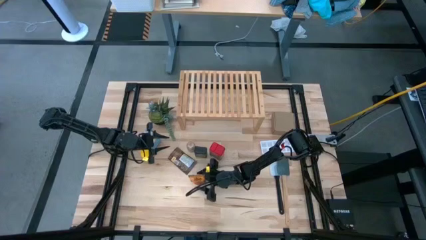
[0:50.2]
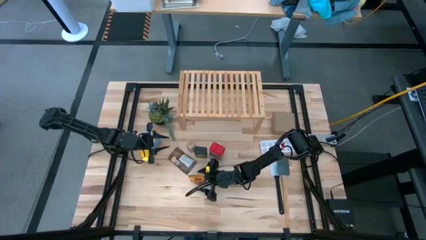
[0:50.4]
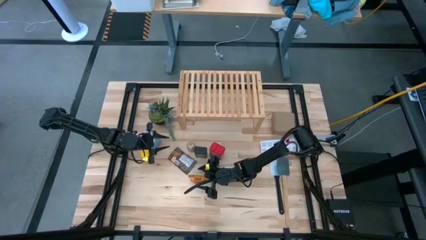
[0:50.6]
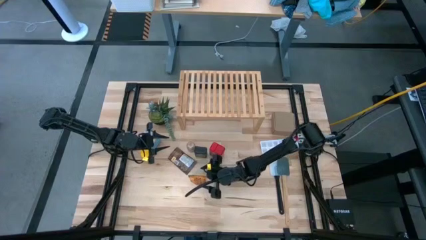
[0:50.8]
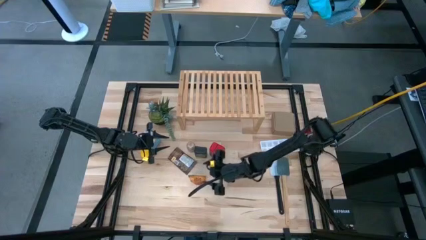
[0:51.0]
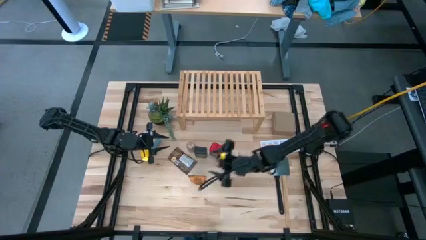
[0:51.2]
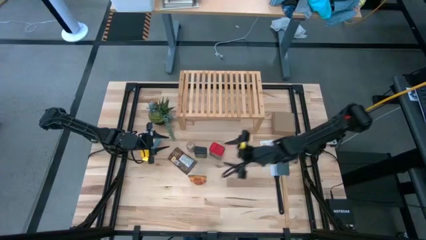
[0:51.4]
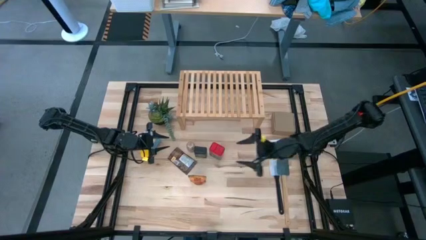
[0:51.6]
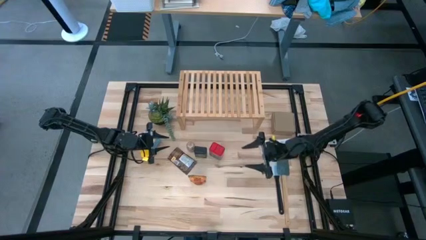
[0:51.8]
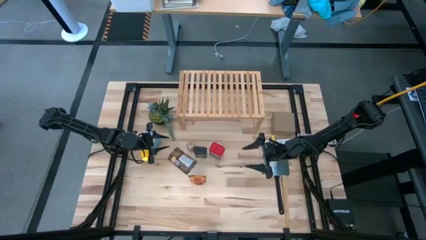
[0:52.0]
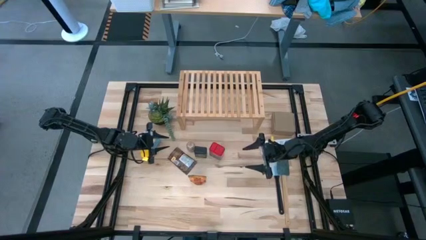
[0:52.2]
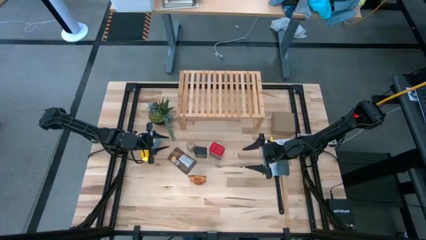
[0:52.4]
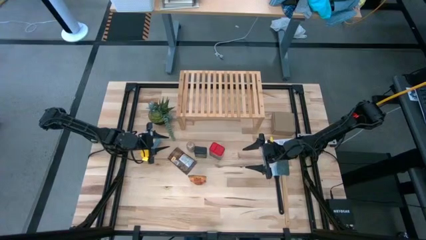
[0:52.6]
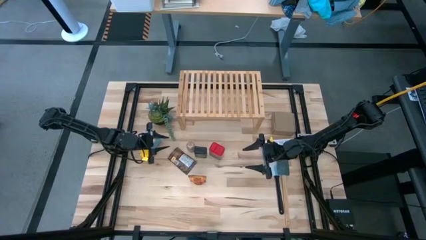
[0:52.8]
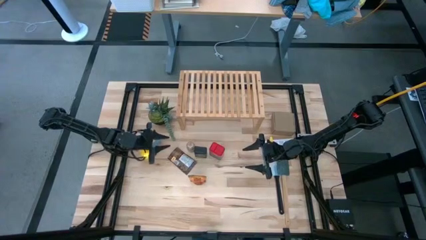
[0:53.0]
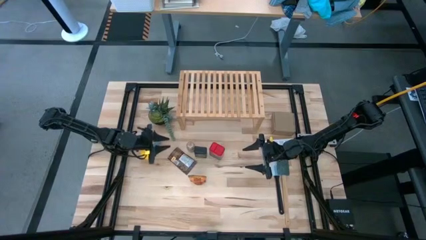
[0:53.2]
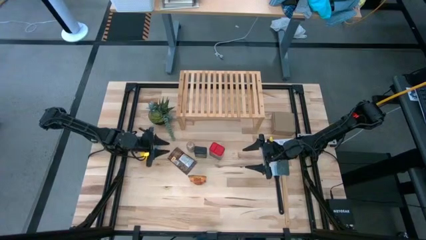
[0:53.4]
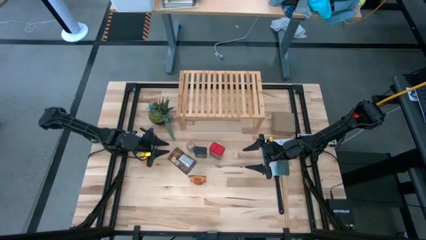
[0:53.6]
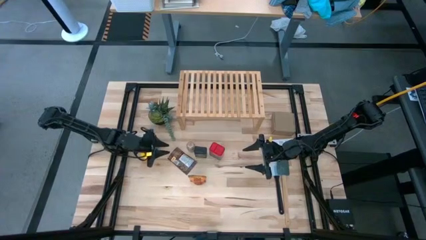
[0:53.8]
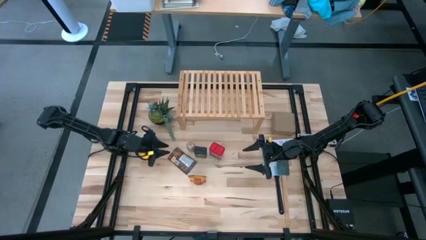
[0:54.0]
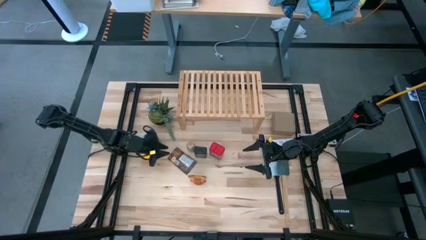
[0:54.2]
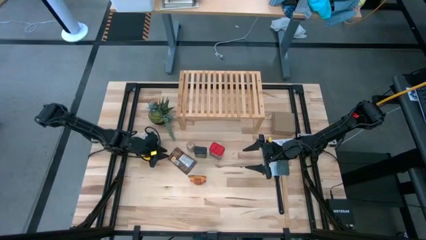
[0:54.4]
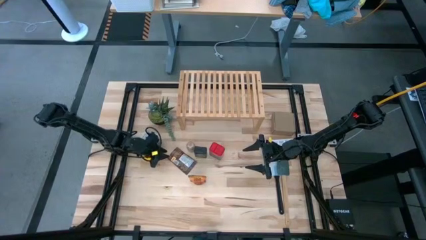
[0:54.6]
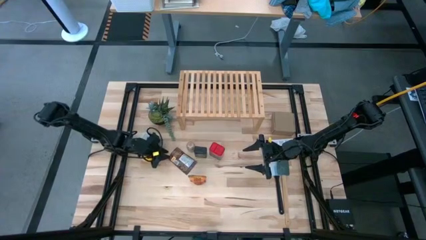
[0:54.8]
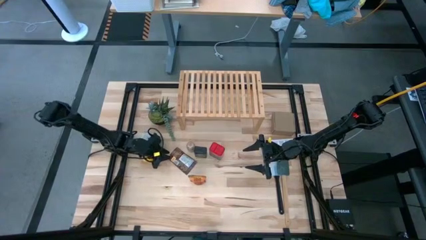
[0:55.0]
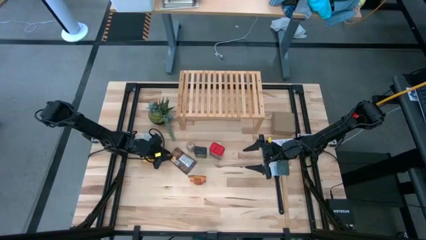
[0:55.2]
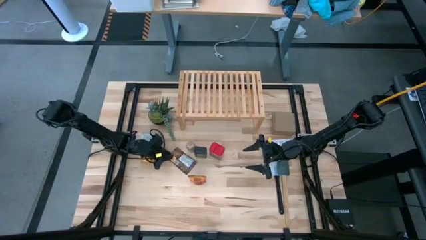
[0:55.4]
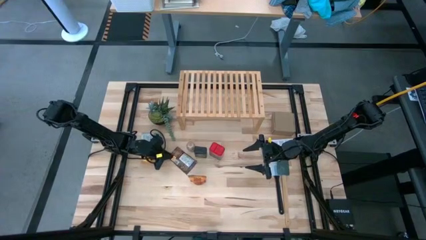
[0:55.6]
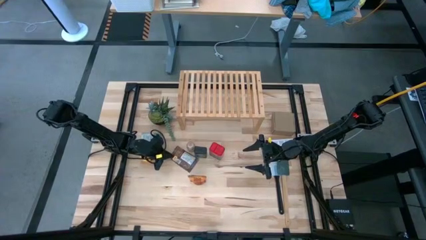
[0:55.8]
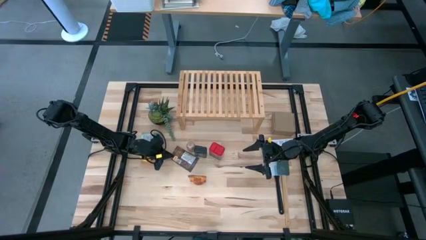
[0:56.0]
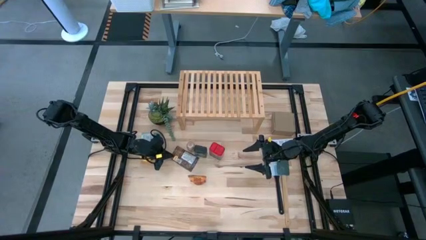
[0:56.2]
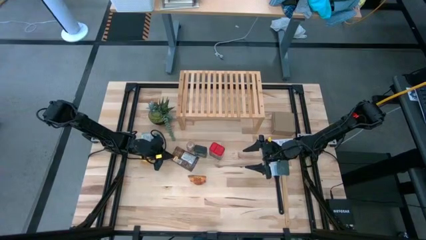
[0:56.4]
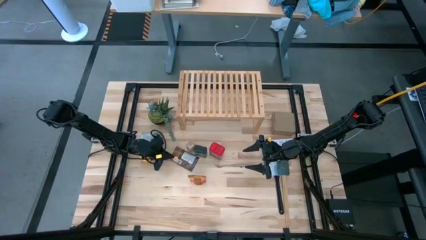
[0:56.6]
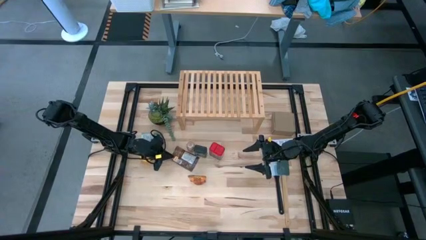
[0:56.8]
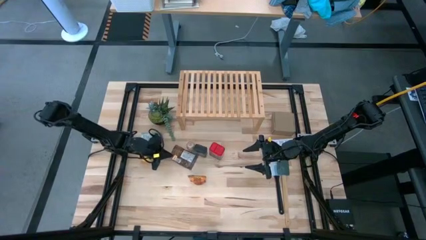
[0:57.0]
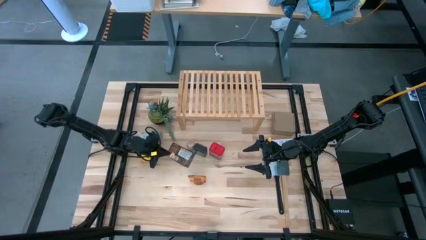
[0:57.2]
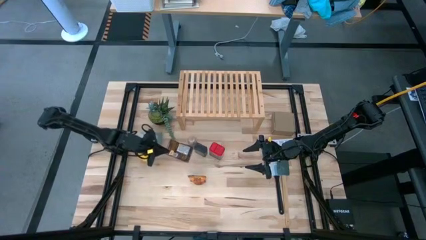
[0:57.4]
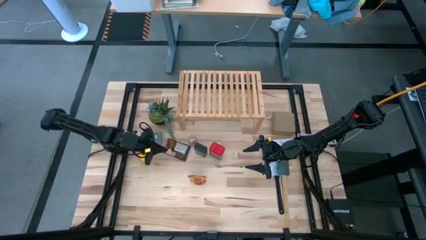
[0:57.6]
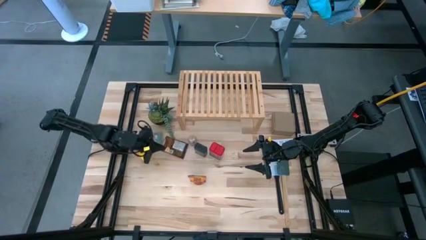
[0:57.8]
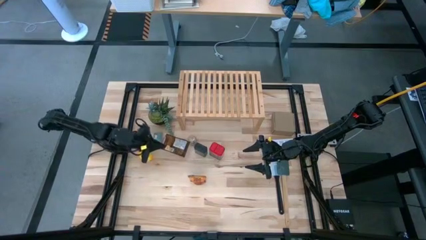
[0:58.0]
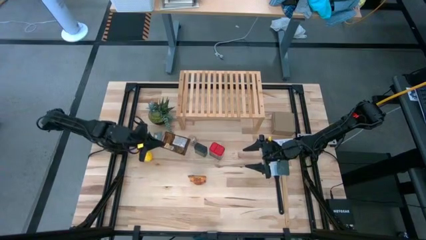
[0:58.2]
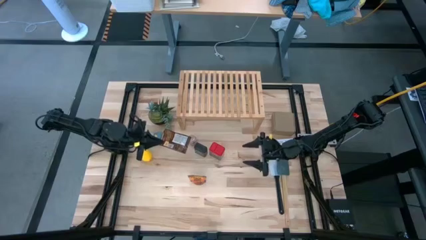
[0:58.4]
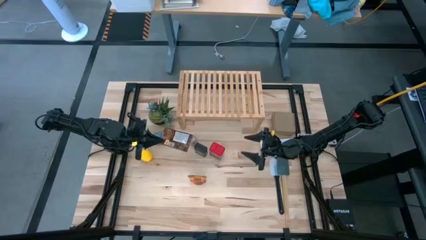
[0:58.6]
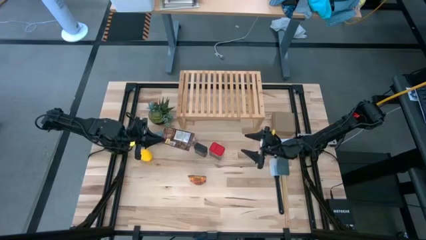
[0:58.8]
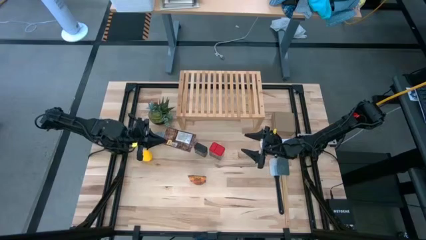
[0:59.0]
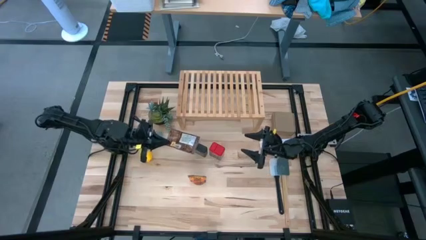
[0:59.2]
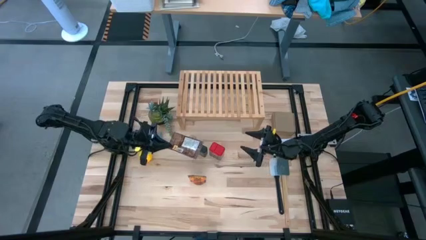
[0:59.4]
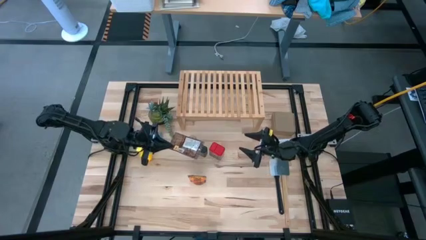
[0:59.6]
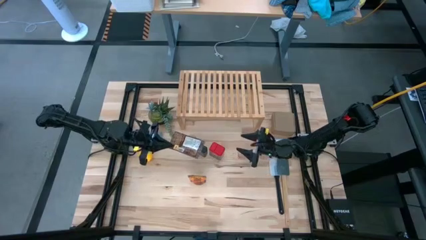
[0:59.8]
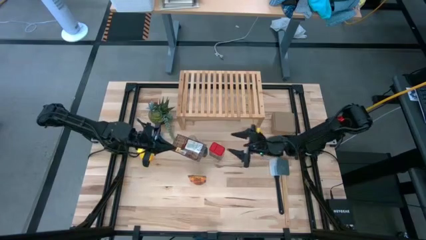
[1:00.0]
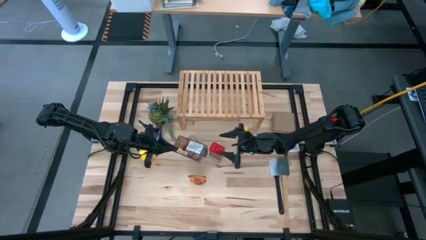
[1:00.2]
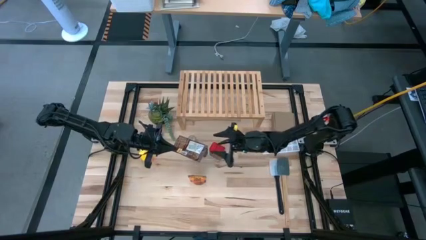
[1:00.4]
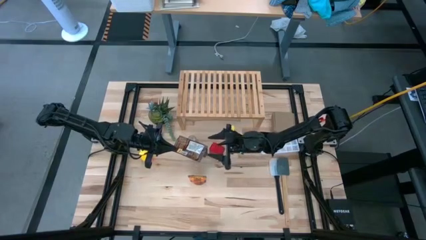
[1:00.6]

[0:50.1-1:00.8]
Task: Shelf spices
Put the orange seasoning pack on the shelf
